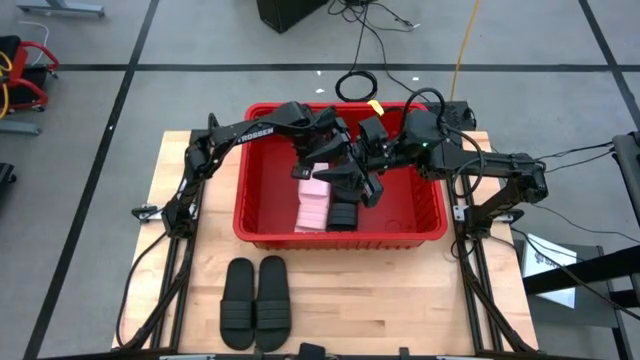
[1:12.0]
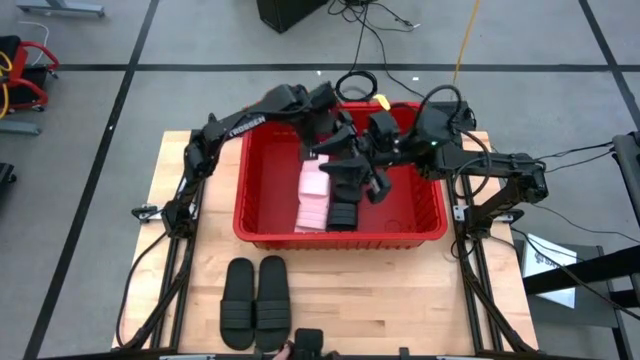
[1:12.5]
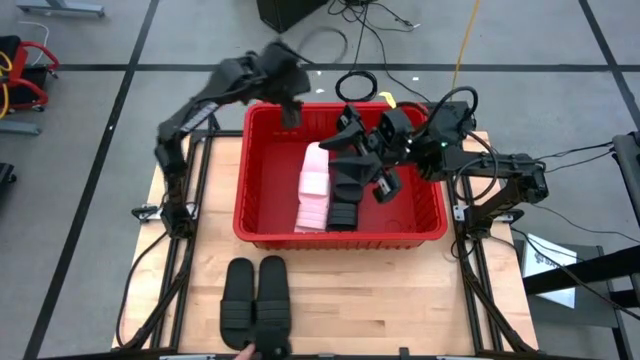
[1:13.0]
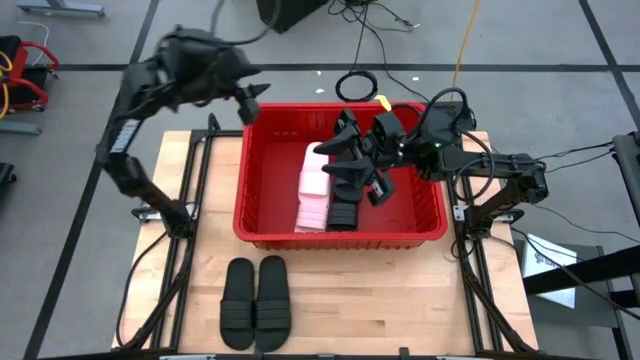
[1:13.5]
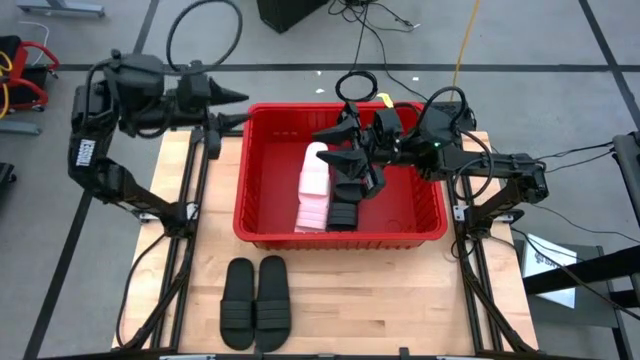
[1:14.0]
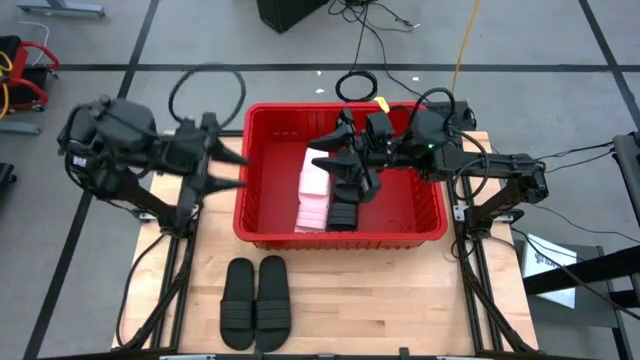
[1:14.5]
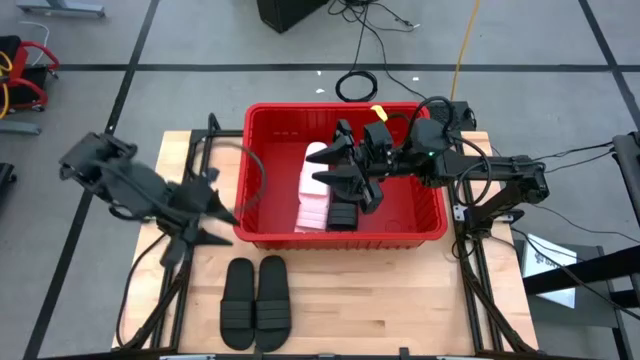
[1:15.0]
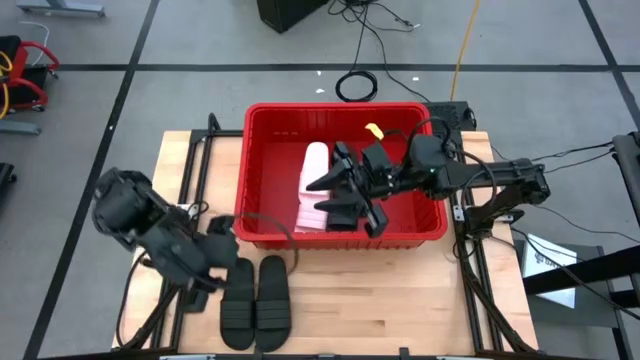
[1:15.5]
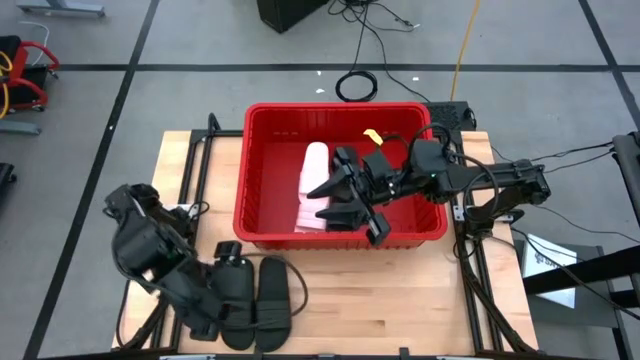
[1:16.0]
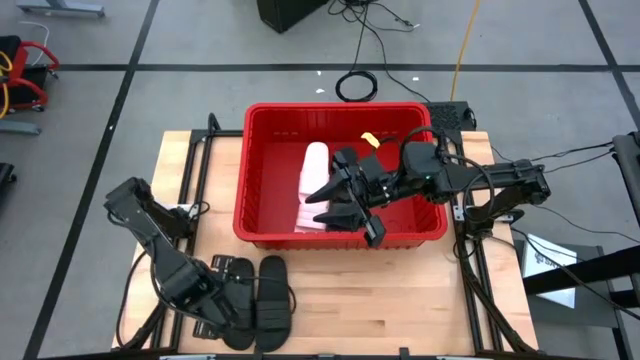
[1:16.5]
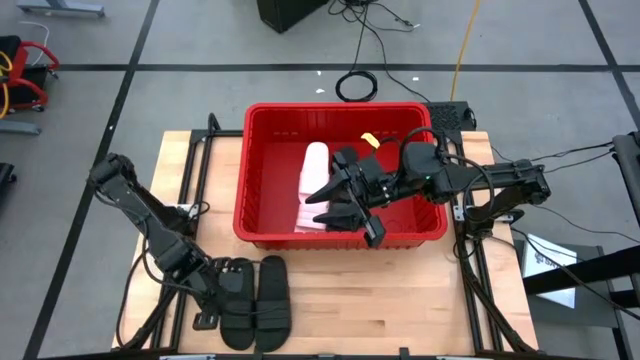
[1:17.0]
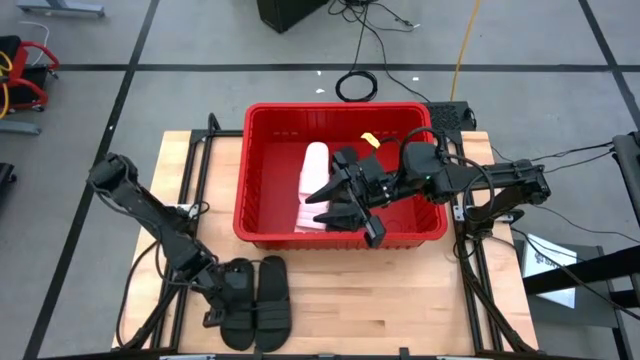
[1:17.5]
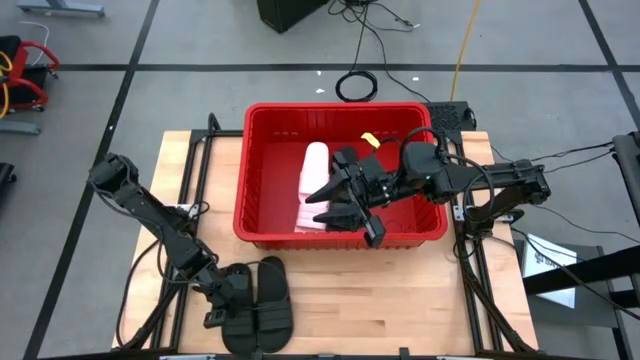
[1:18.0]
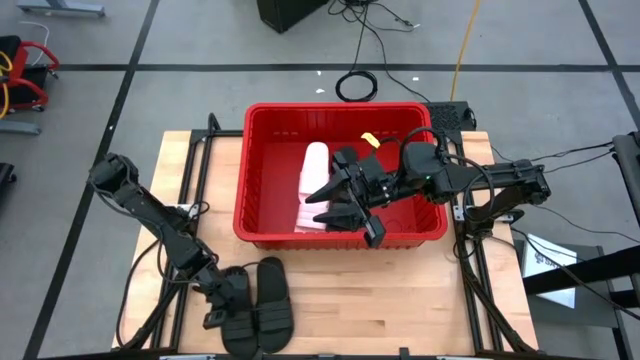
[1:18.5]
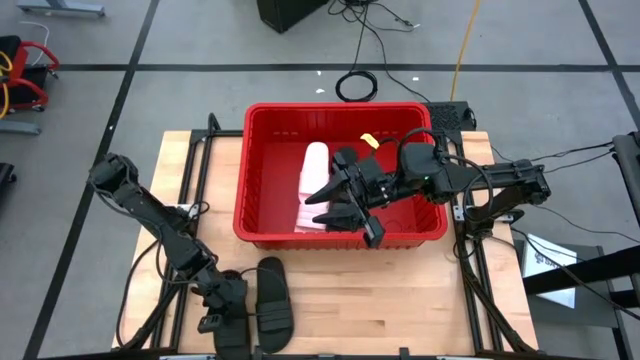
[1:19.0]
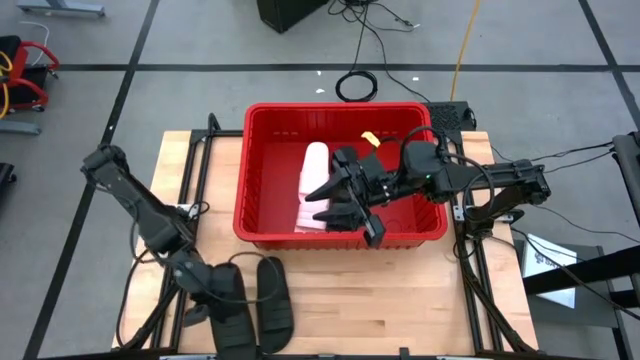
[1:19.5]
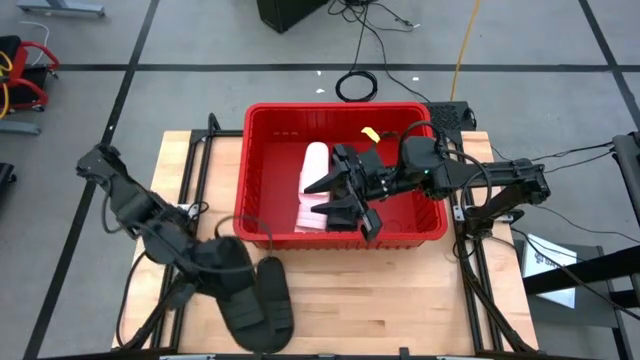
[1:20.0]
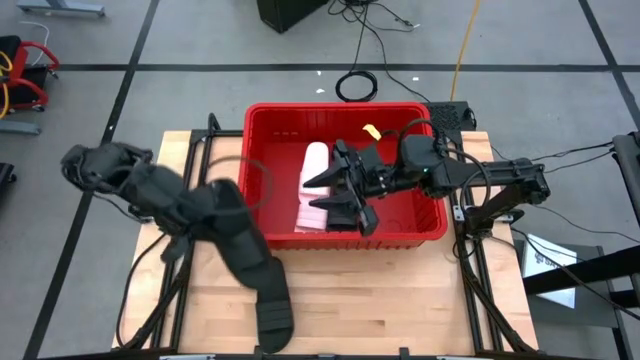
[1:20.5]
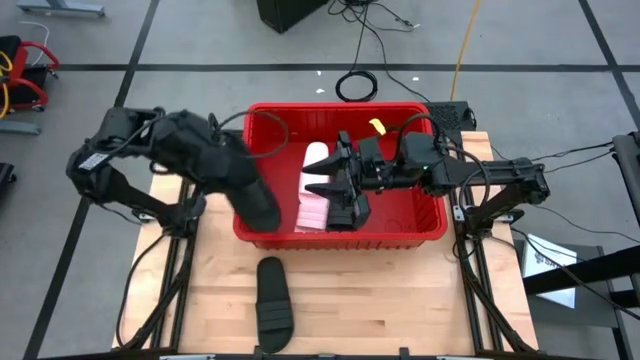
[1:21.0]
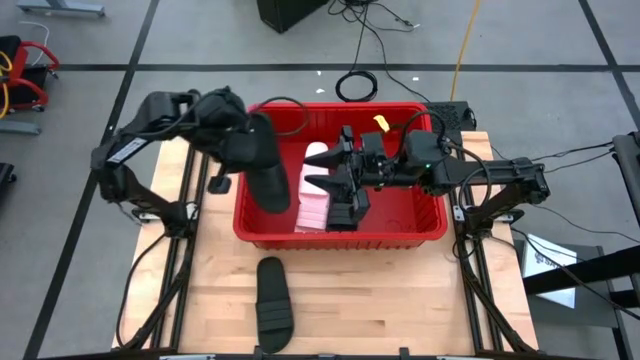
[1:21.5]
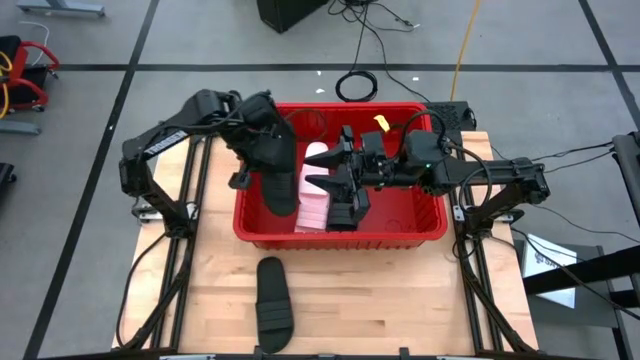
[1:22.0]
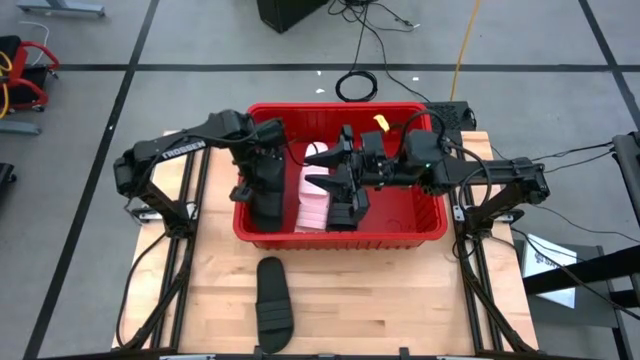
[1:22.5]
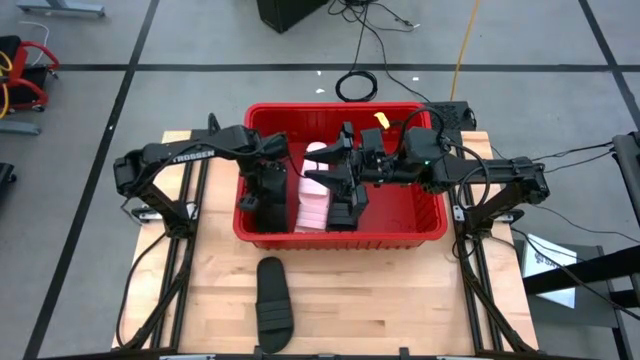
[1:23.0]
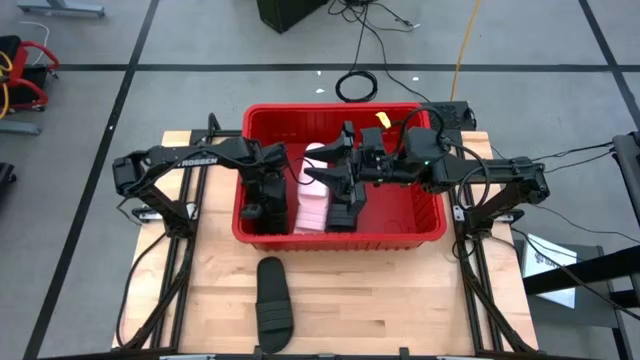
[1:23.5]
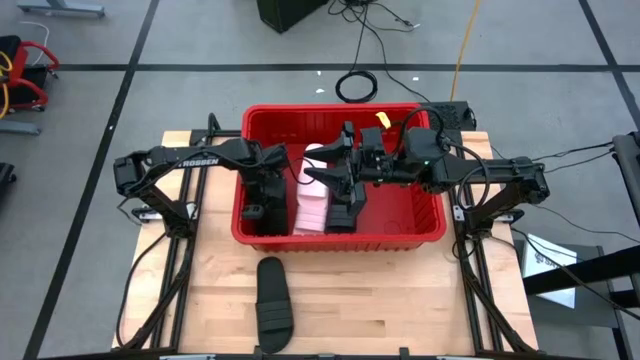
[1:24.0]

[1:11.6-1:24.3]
Task: Pick and place slides into bin
Put the black slipper into the red bin
